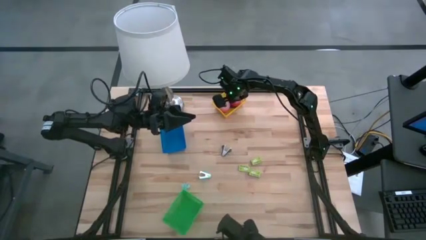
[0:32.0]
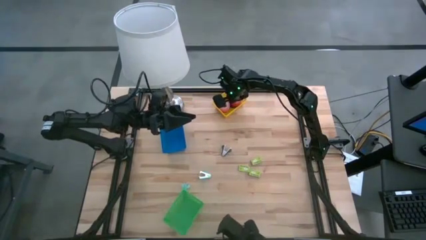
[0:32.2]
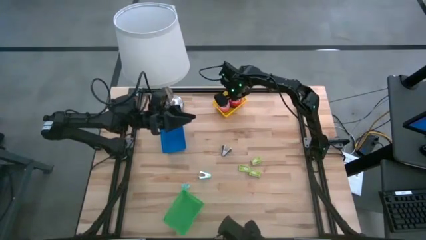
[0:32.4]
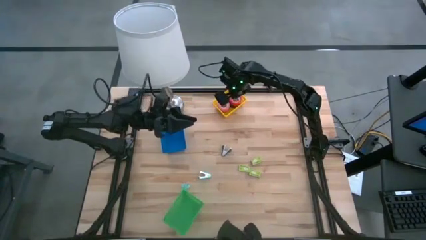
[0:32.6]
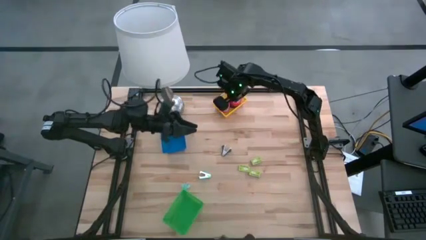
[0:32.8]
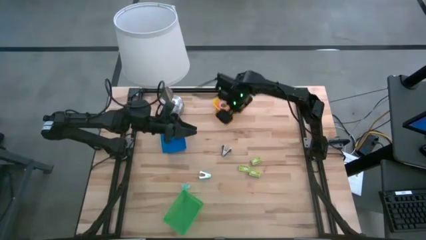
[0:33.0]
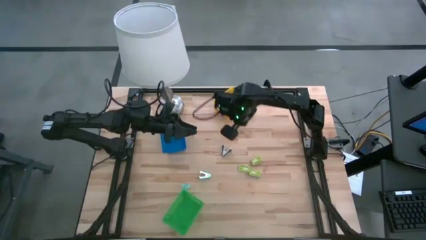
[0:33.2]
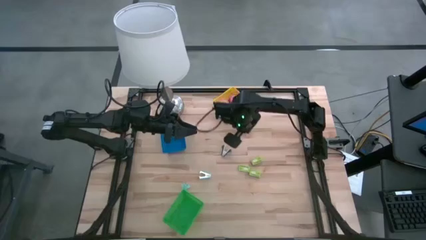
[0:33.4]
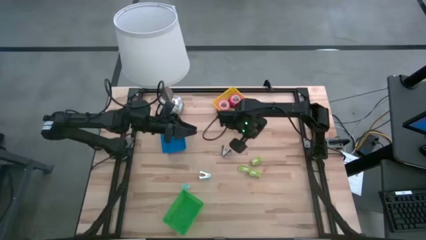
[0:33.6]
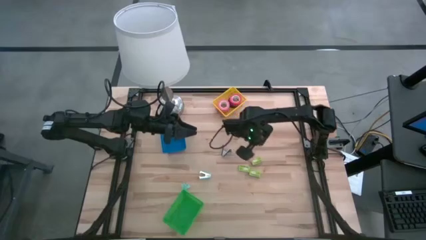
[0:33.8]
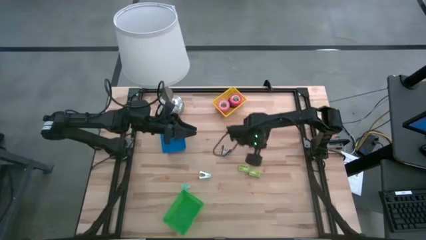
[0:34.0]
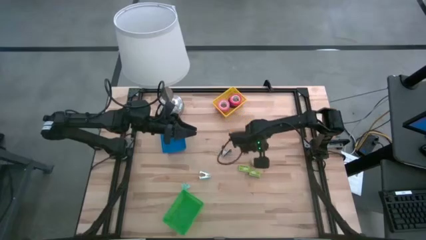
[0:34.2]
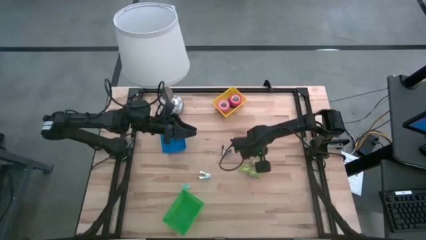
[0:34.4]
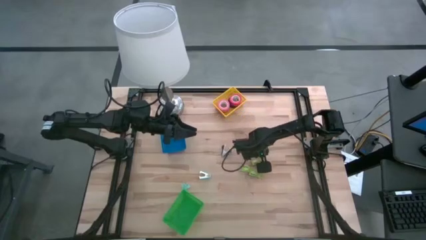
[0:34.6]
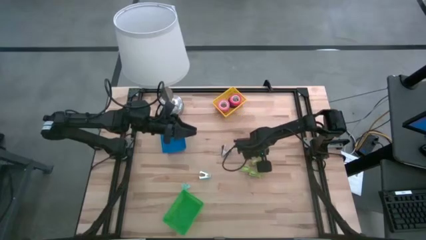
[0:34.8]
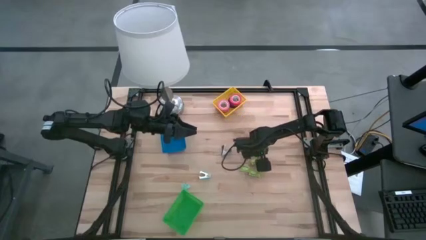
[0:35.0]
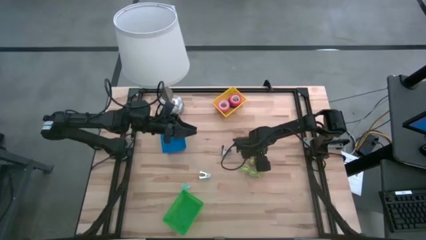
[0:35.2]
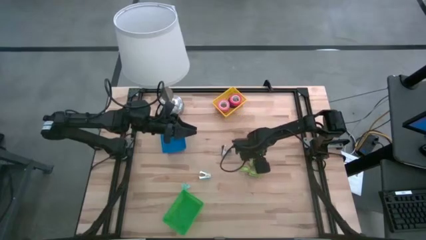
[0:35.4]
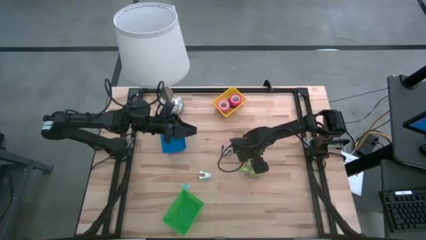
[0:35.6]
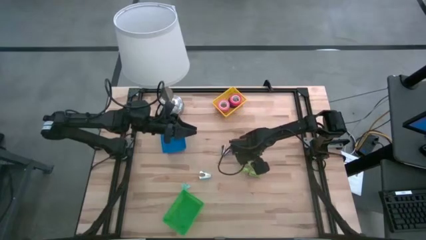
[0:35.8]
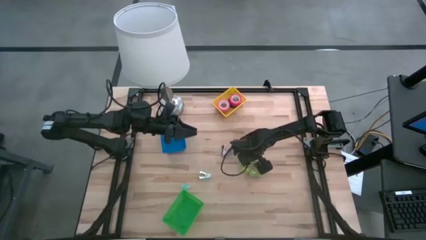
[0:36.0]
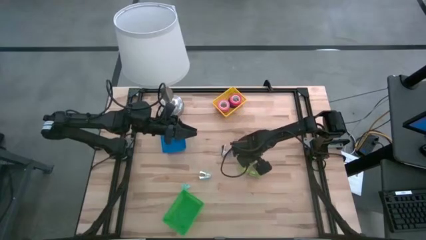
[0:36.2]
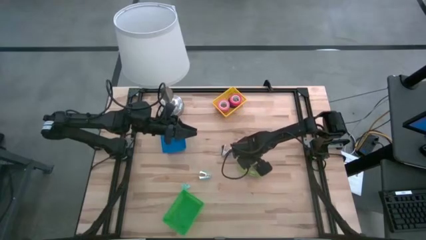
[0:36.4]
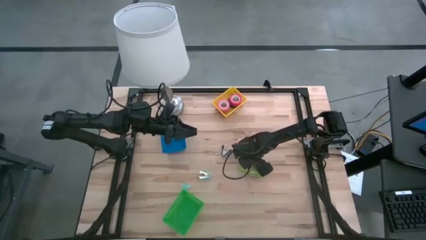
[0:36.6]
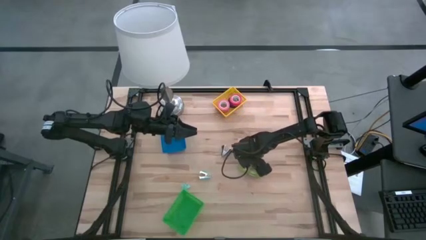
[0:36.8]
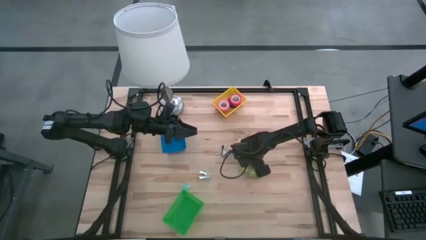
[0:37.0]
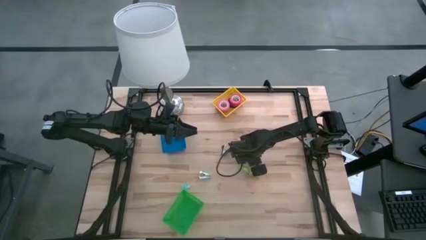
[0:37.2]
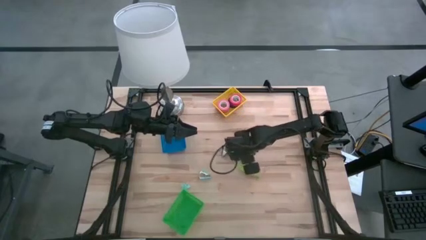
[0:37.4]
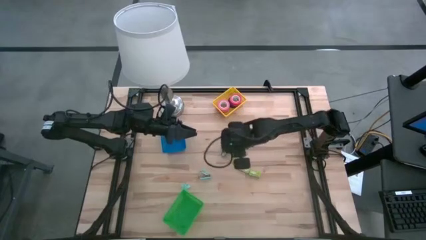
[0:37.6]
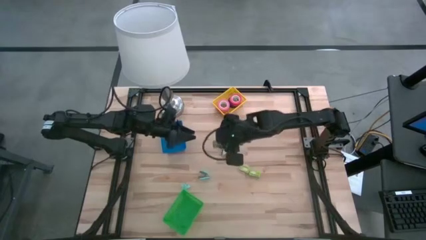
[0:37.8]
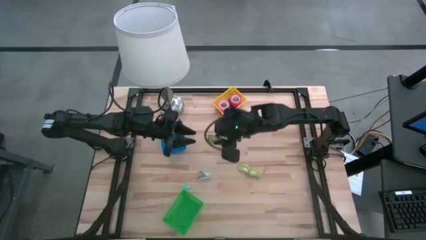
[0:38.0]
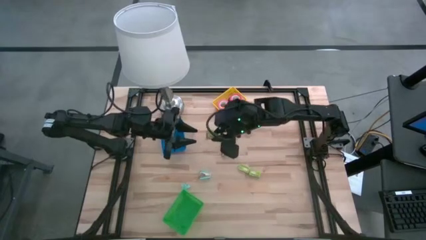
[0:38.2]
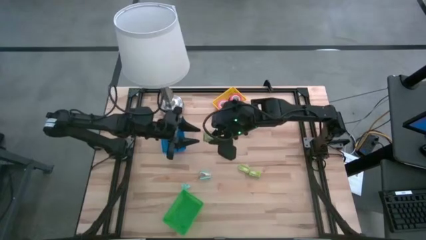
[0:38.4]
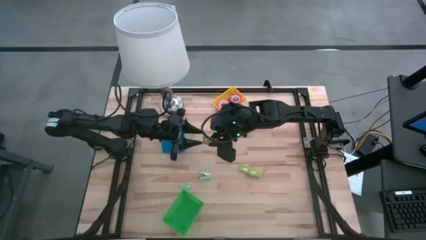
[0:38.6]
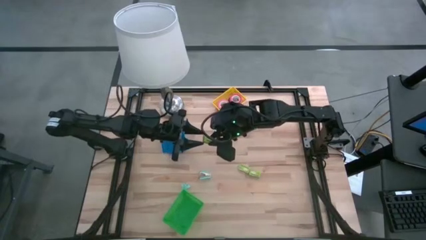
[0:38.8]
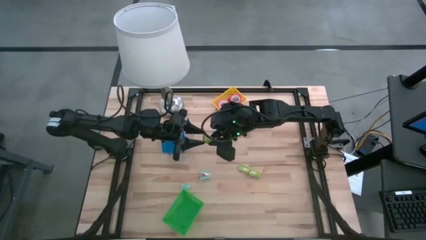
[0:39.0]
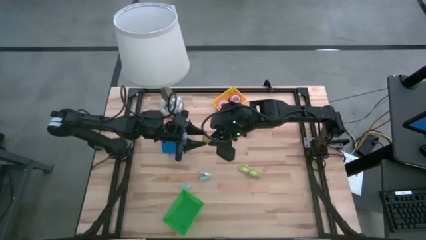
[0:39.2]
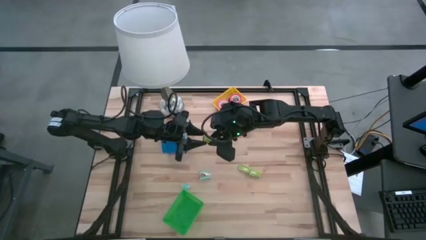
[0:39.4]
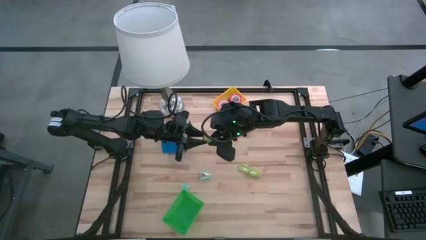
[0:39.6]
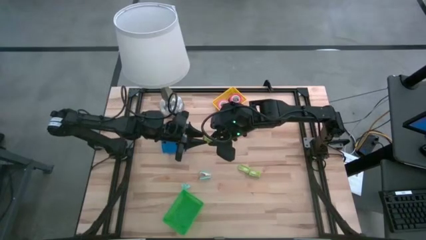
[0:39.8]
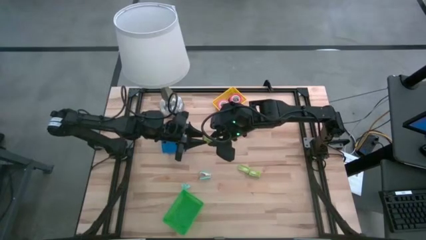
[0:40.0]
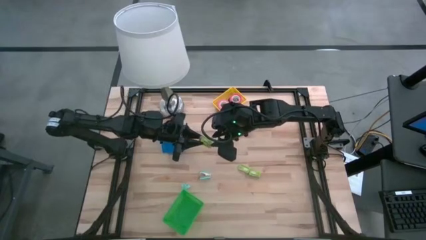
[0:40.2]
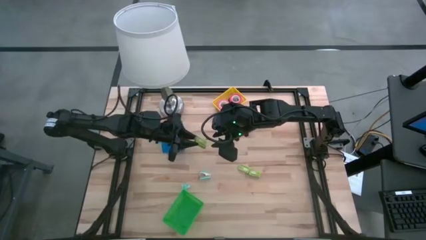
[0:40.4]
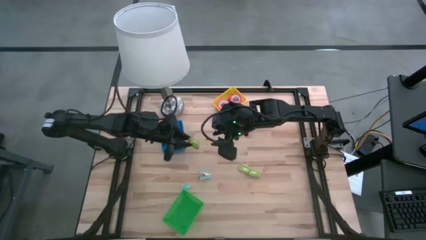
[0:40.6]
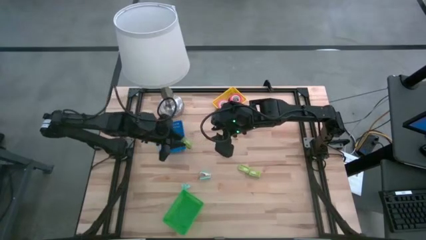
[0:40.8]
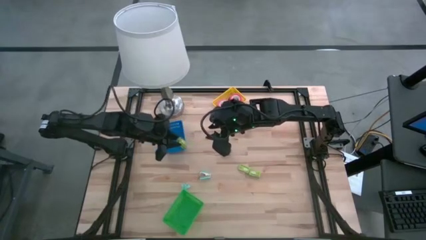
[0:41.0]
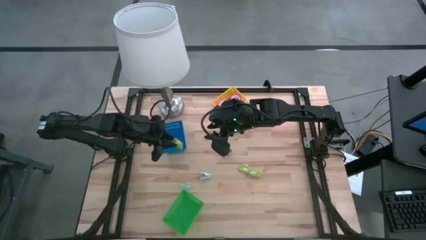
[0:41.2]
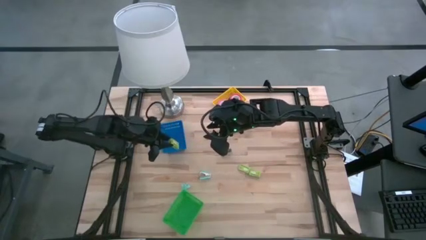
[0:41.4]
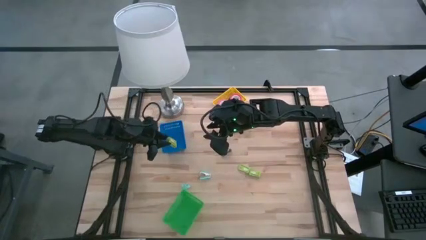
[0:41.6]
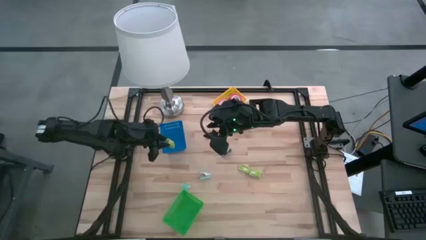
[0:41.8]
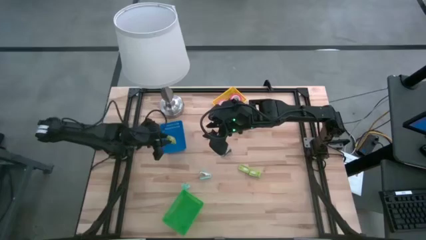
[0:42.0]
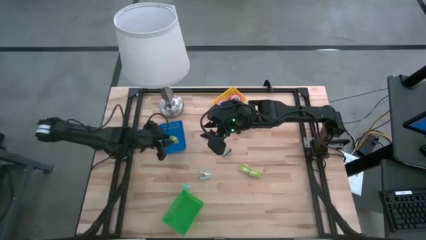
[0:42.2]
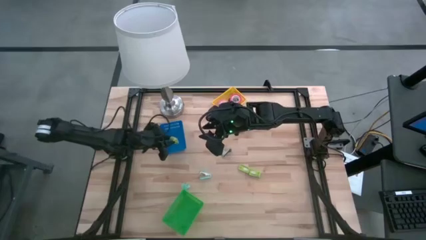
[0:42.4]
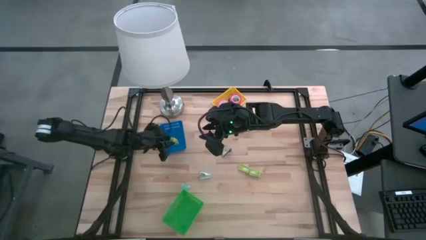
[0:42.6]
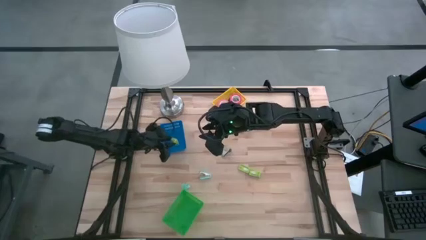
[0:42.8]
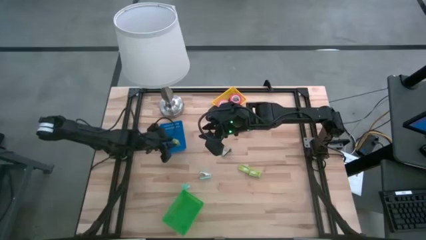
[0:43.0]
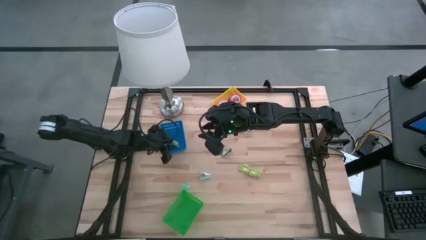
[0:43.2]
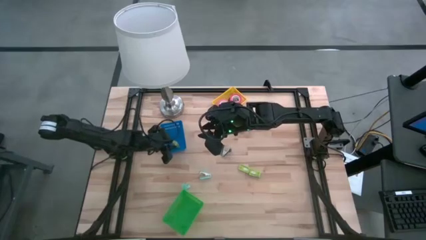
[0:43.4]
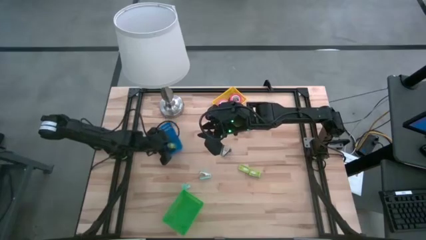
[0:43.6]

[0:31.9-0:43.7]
Task: Pick and place Stapler, Stapler remover, tape
Put the top green staple box into the blue bin

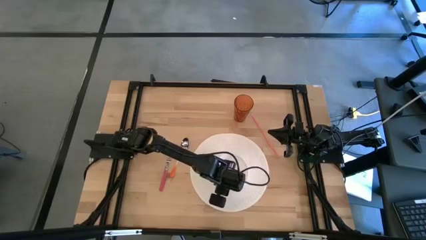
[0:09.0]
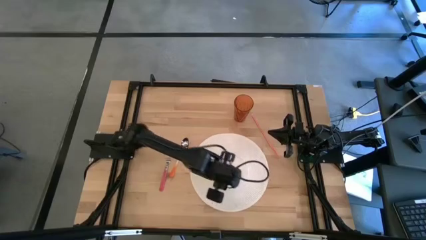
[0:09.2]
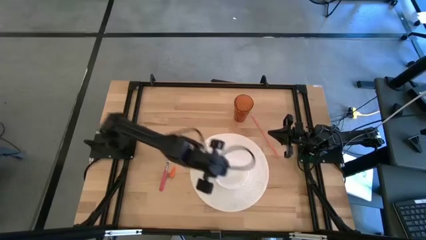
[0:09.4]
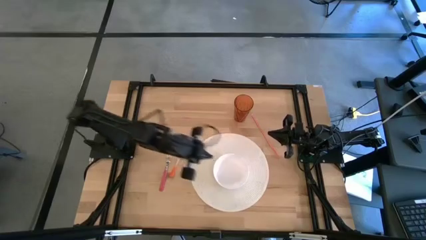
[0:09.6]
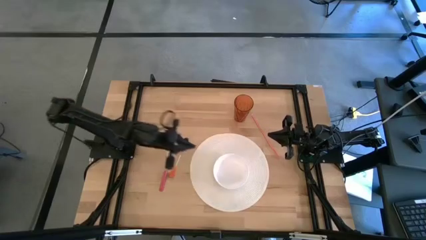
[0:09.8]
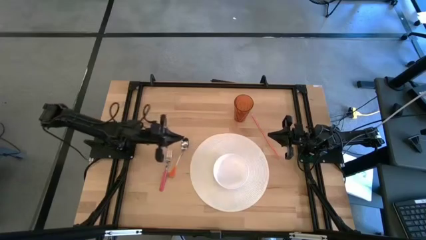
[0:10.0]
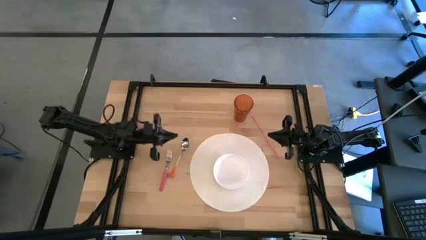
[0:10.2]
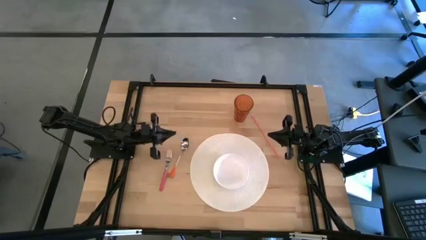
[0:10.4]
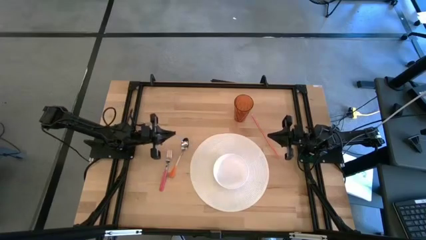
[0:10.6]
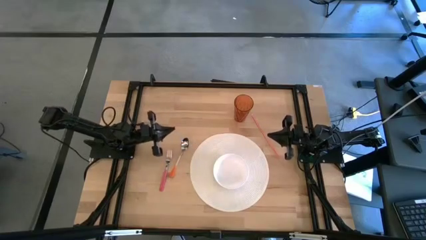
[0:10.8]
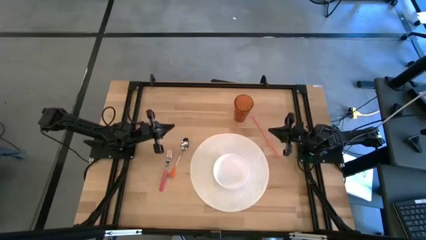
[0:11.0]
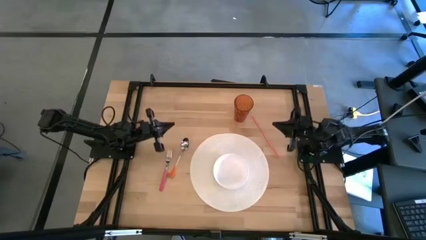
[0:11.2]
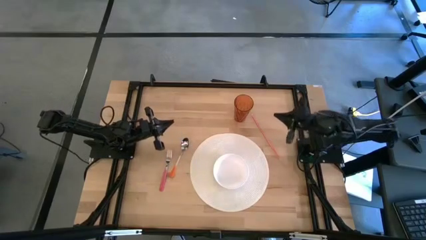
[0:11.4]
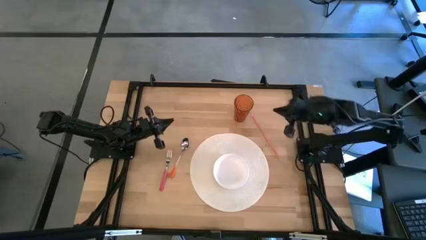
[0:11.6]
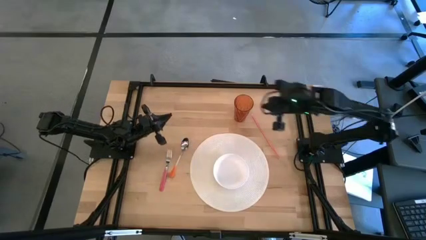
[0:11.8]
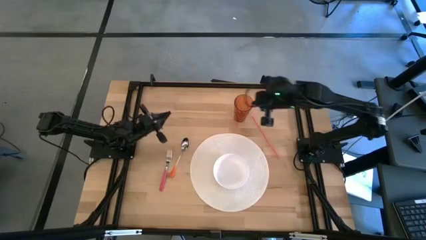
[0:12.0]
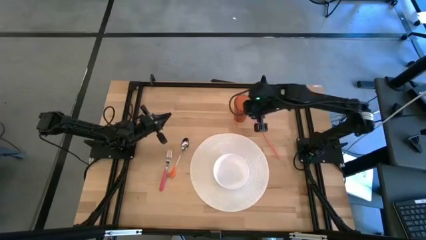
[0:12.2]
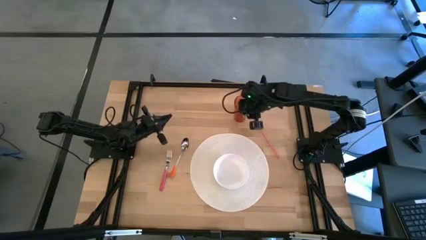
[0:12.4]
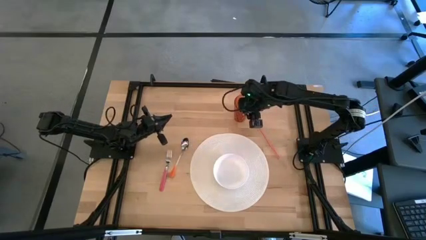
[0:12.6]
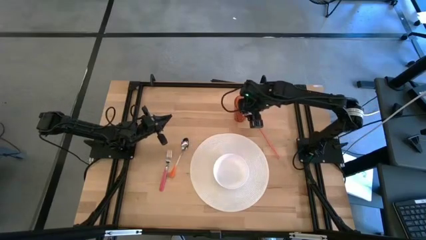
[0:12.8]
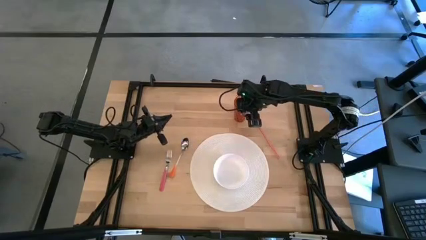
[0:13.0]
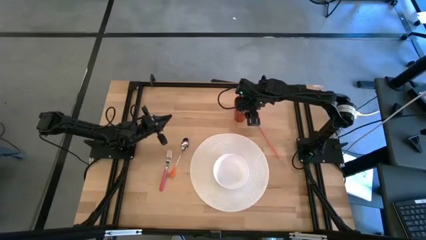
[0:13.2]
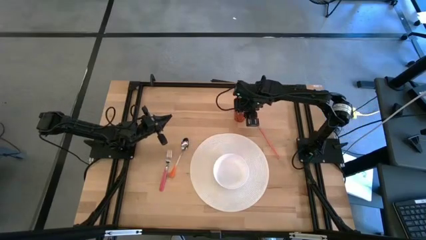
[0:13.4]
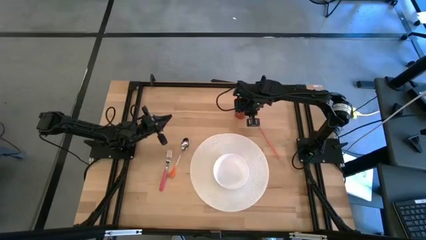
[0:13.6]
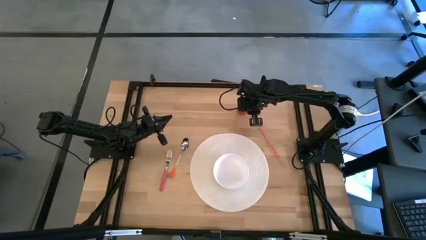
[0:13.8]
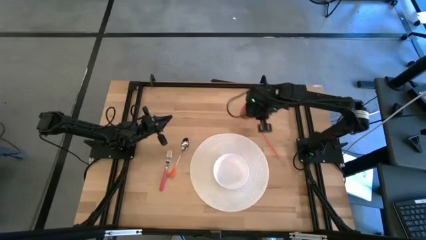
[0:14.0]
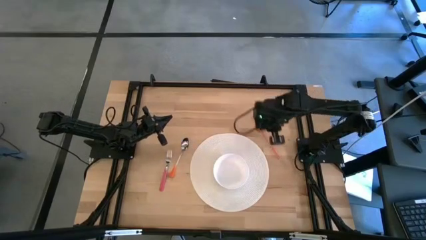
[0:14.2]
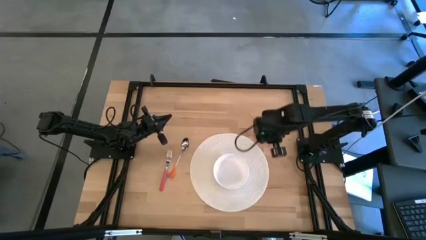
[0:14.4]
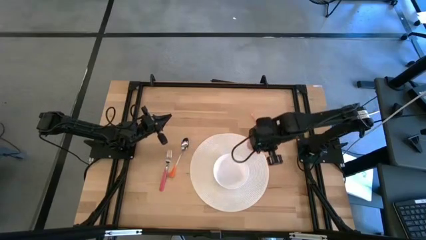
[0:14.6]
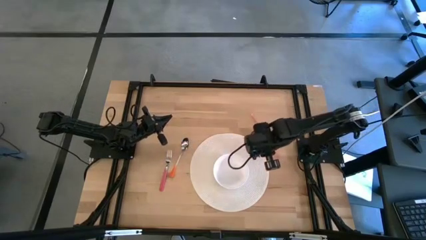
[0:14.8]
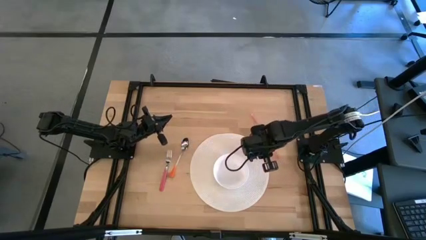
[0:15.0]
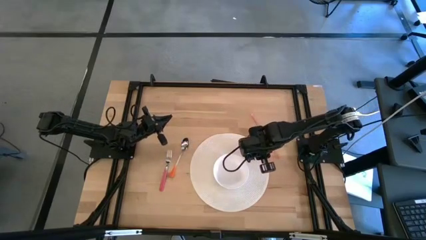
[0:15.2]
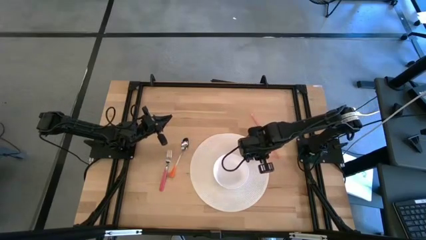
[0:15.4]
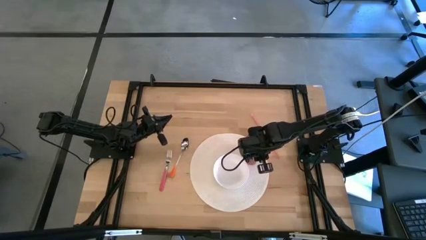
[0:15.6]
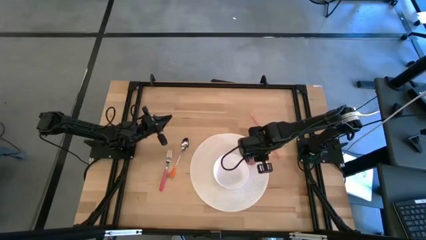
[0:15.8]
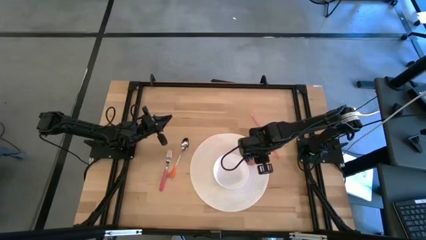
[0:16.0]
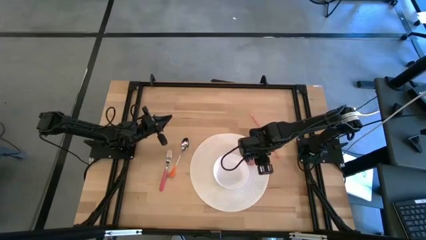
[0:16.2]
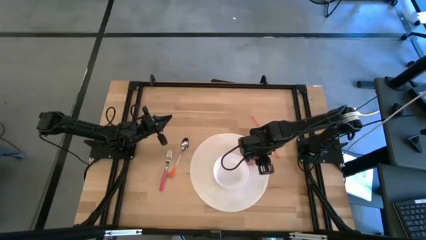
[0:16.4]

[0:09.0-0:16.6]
Task: Pick & Place Utensil
Put the brown cup on the white mat to the top right of the white bowl
